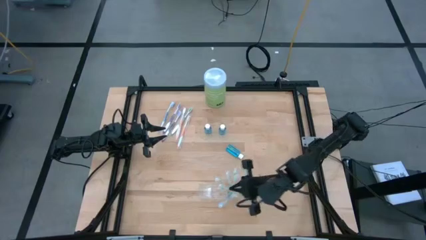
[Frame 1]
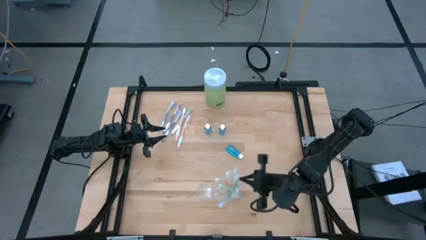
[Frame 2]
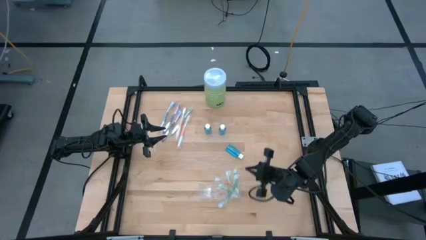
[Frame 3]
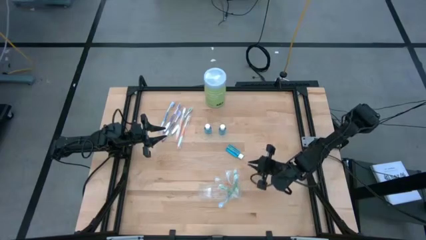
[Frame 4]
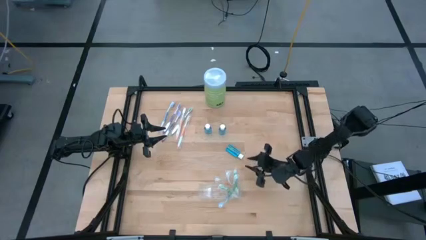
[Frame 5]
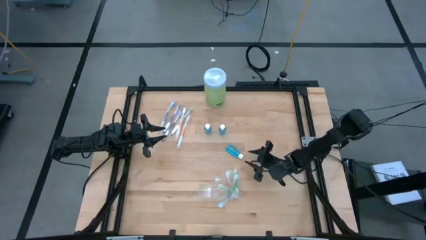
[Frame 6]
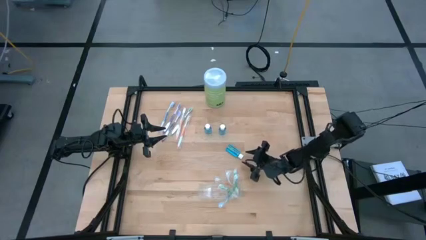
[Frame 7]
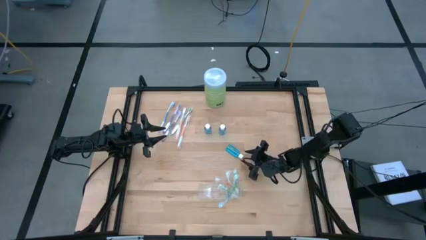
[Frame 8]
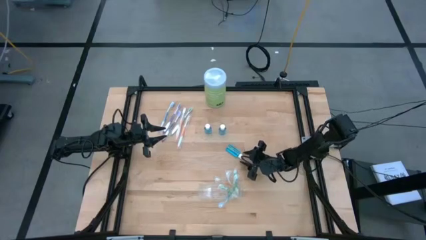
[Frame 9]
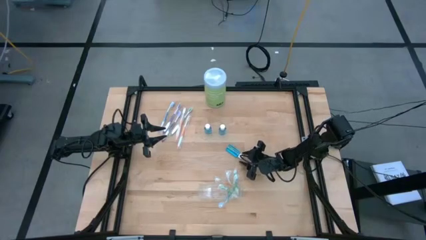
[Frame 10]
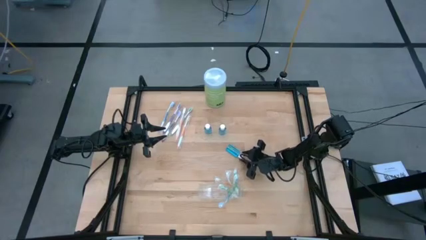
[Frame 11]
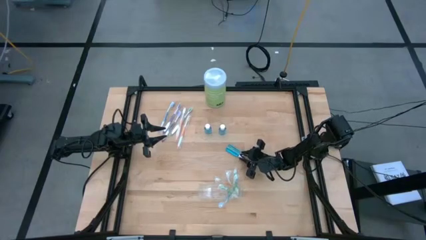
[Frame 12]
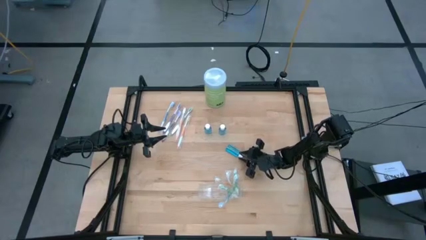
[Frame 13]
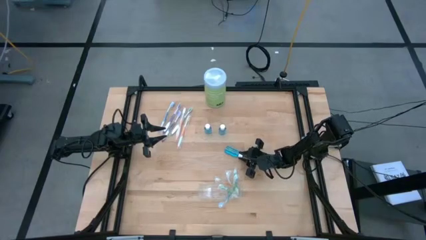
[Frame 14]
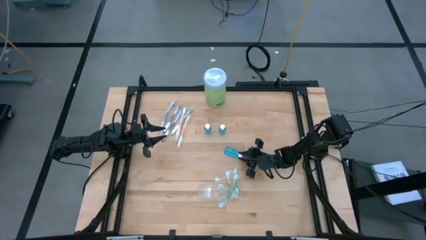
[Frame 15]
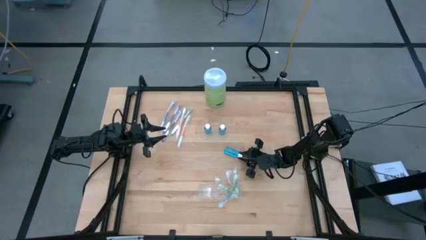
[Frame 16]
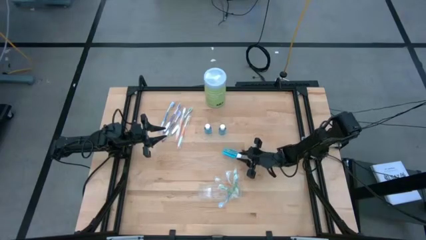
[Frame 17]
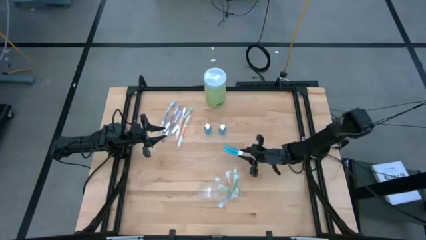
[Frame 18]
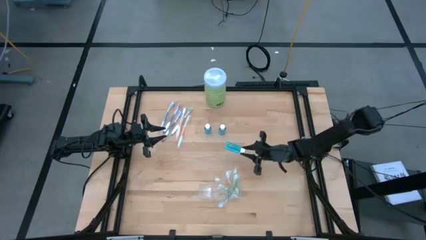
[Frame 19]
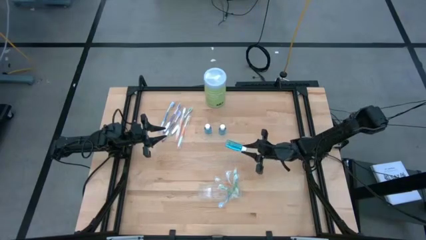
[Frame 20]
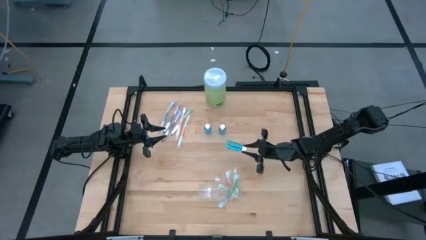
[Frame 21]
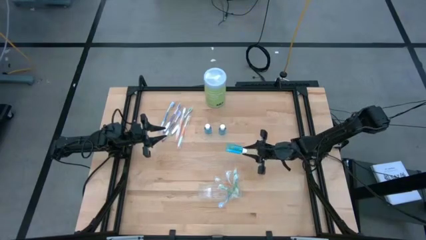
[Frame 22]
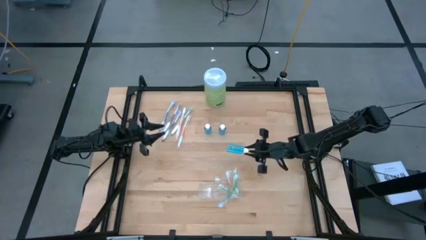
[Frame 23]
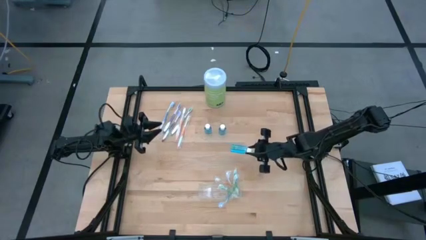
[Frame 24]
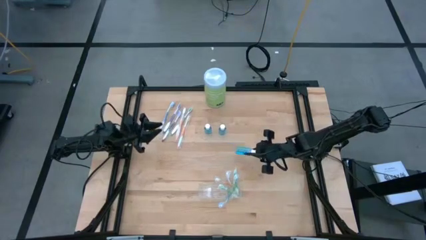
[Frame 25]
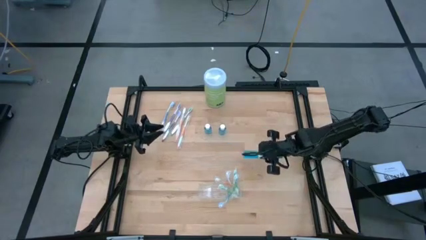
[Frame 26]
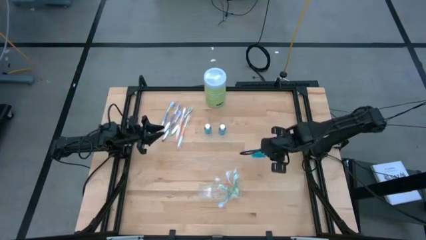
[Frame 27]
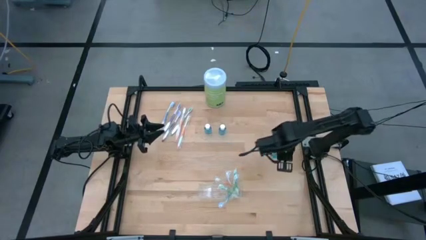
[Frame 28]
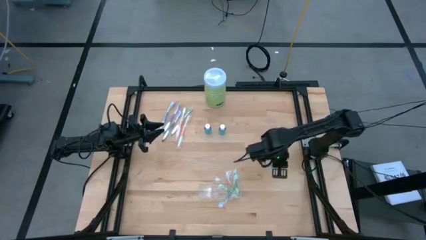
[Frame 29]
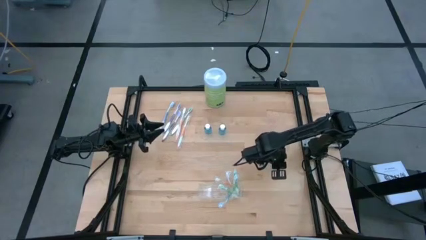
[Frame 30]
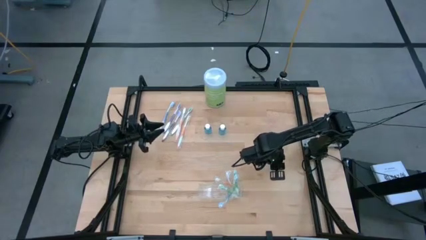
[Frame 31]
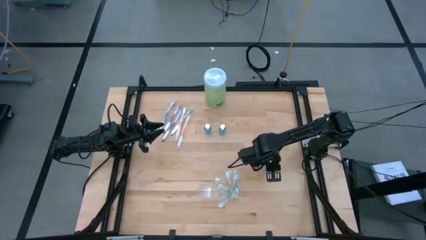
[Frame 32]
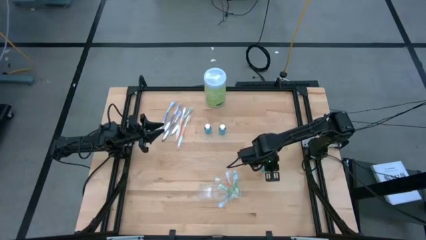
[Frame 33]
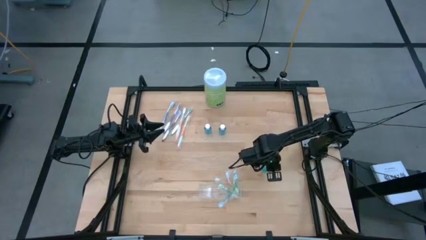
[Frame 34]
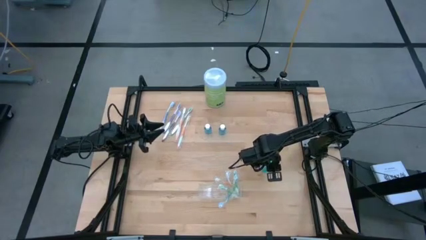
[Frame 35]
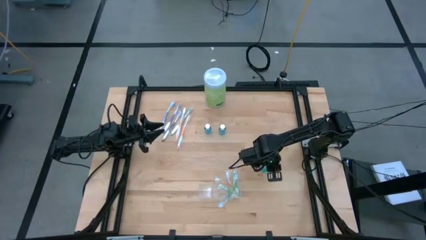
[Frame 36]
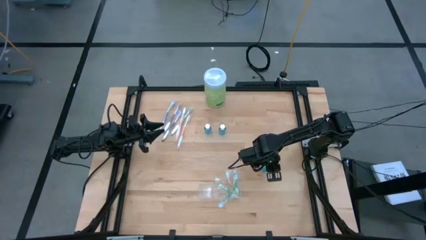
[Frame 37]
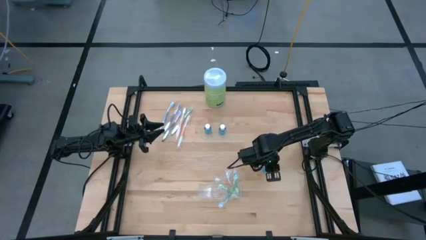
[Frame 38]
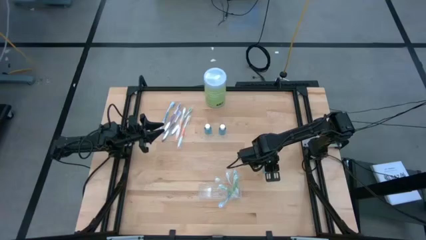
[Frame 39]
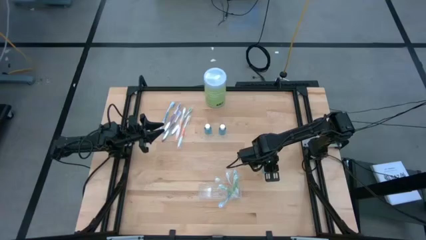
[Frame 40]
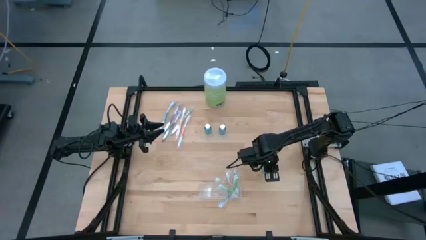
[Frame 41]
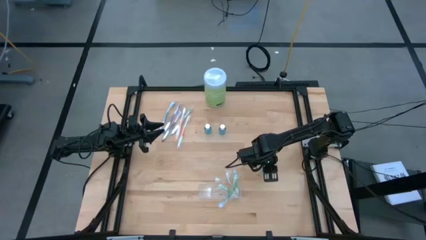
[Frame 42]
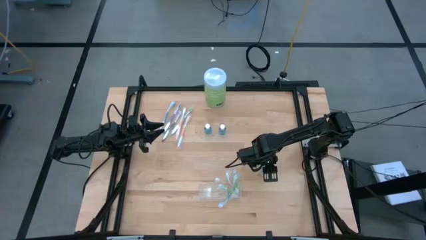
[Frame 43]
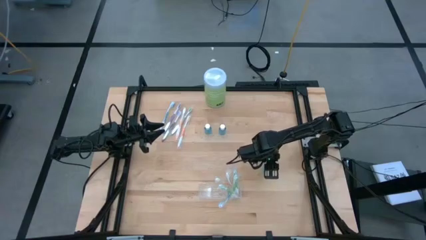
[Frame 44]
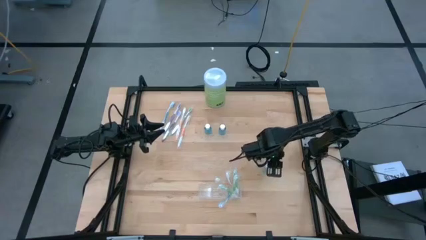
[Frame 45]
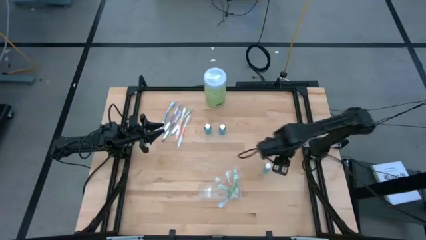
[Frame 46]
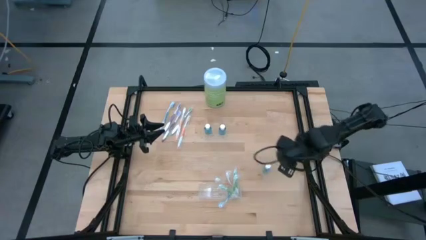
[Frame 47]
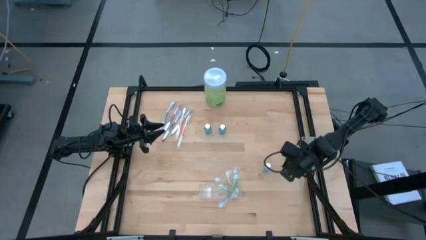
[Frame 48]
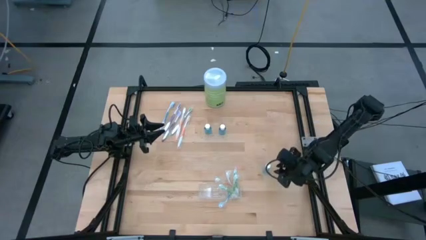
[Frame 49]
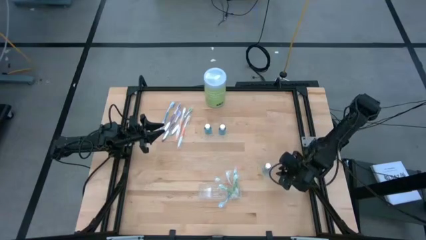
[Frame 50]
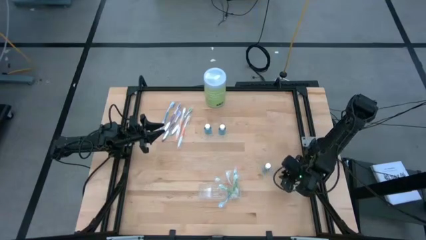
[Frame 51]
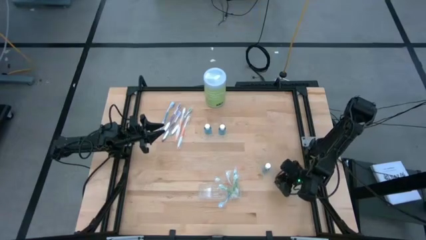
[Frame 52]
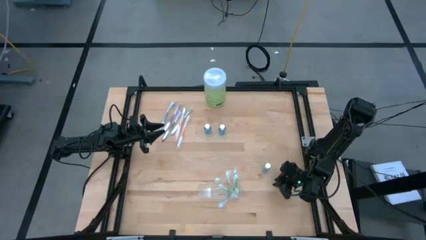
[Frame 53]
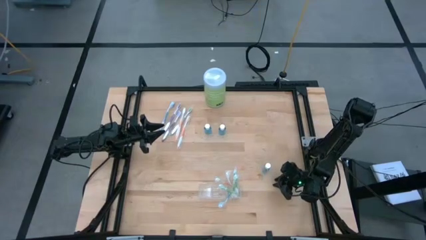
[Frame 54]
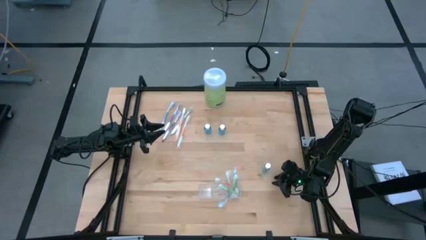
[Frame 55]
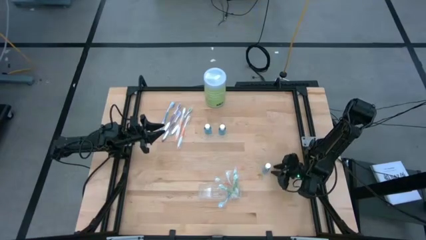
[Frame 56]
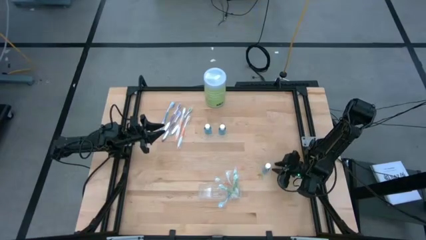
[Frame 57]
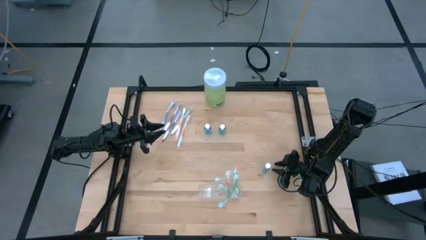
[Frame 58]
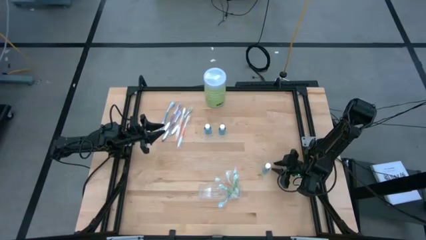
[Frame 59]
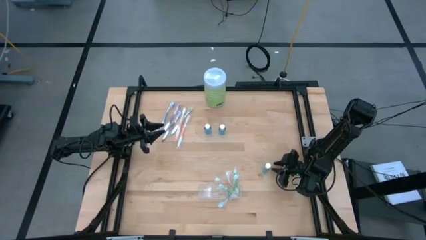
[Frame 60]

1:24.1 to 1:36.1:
Task: Pick & Place toothbrushing station
Put the mouthwash into the transparent organizer
